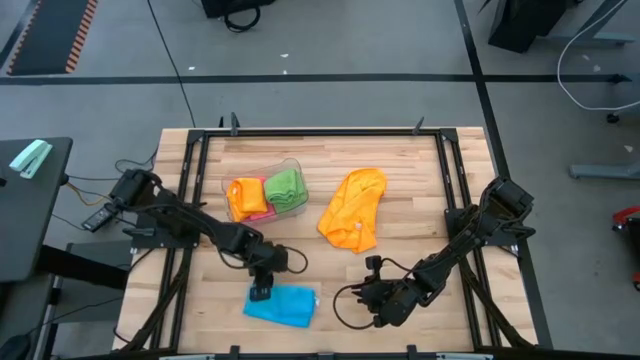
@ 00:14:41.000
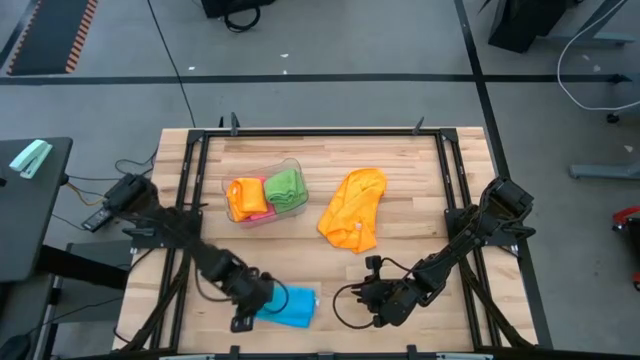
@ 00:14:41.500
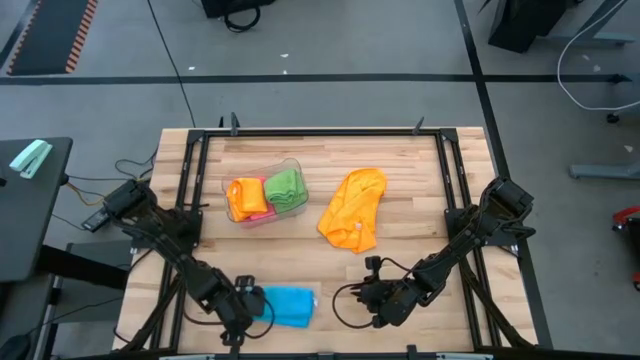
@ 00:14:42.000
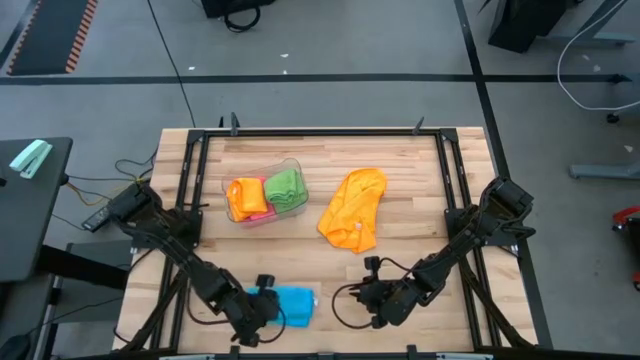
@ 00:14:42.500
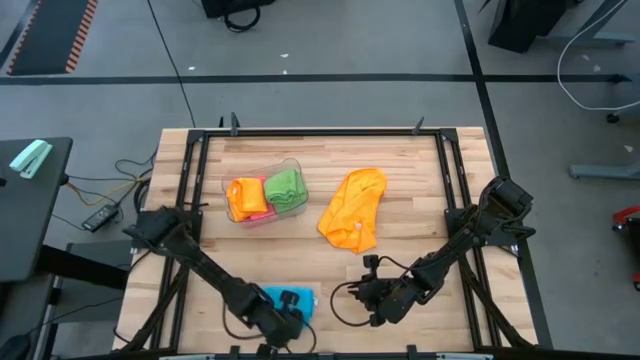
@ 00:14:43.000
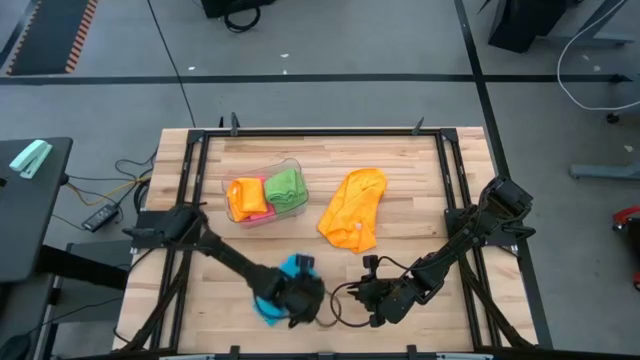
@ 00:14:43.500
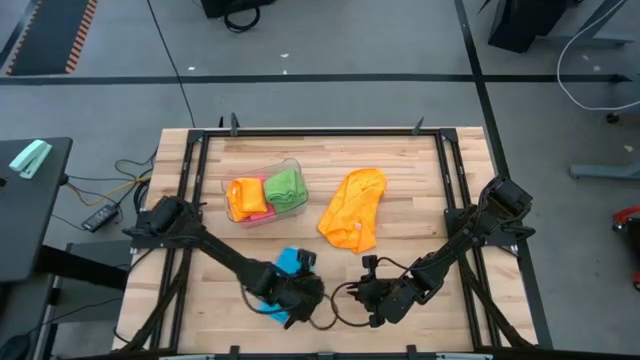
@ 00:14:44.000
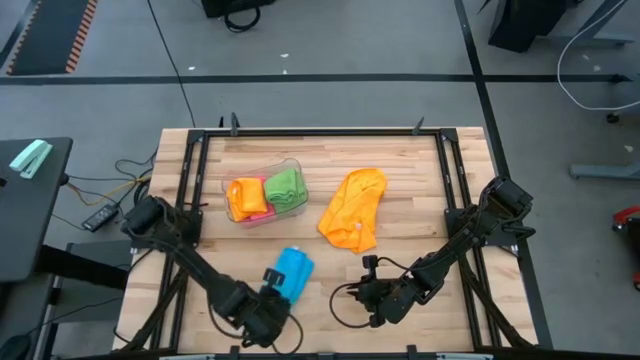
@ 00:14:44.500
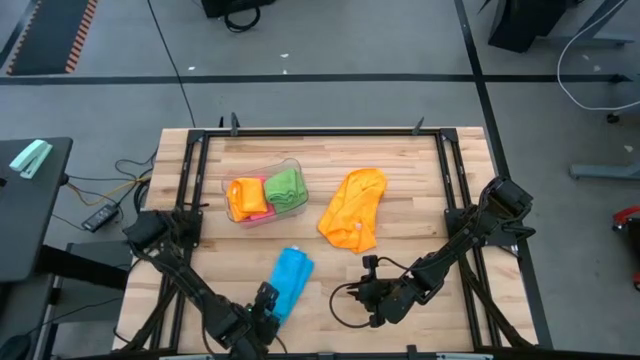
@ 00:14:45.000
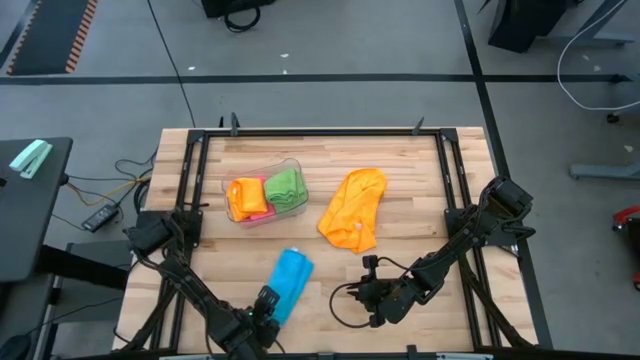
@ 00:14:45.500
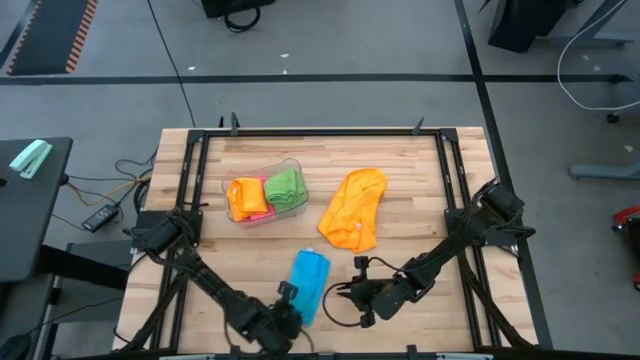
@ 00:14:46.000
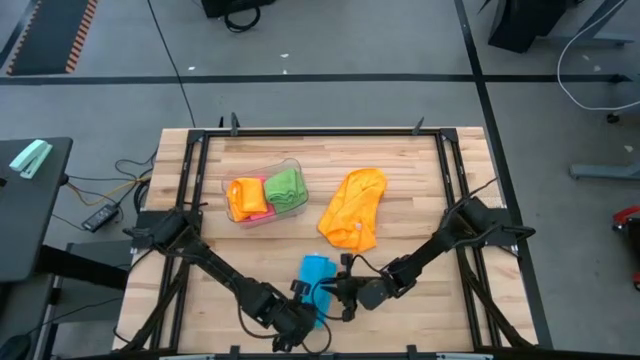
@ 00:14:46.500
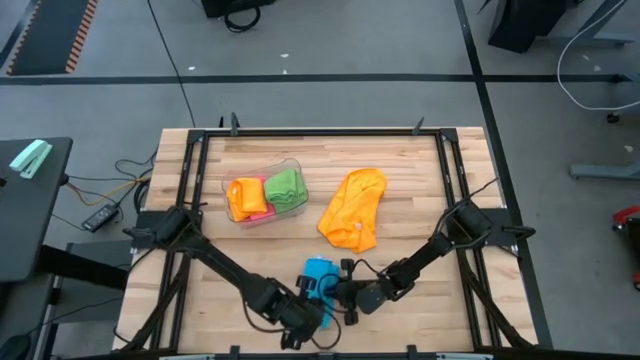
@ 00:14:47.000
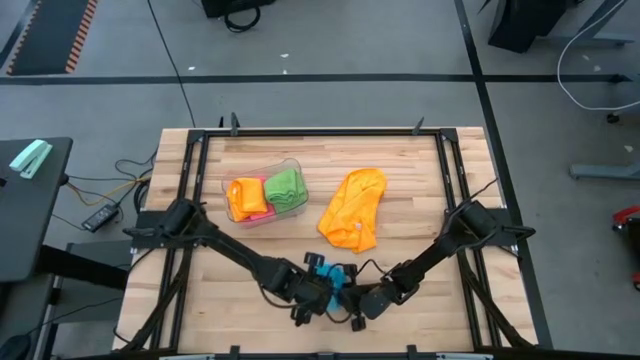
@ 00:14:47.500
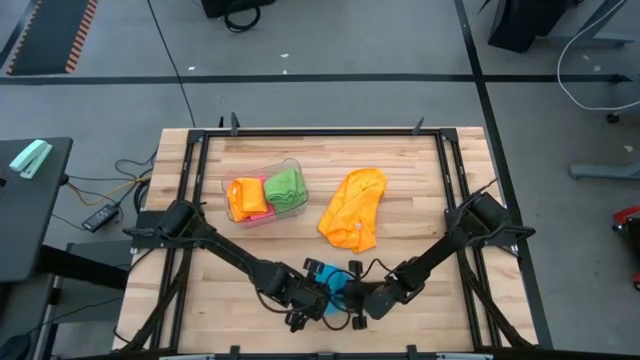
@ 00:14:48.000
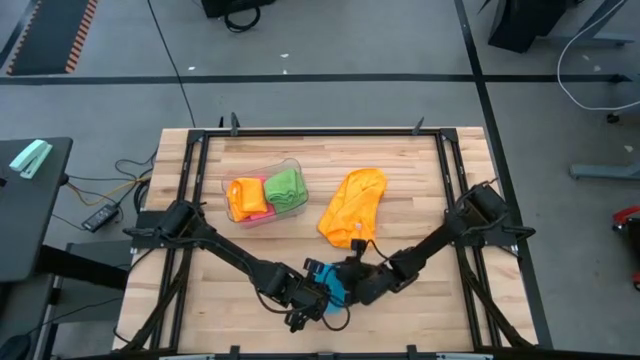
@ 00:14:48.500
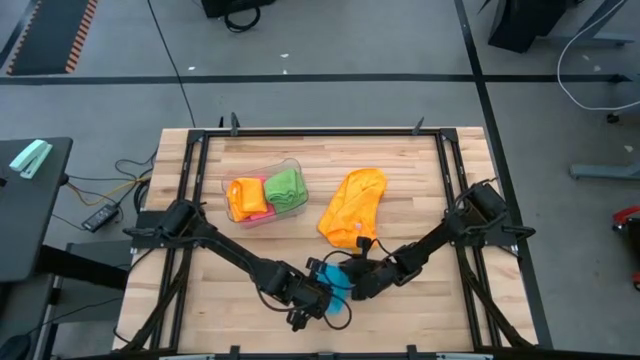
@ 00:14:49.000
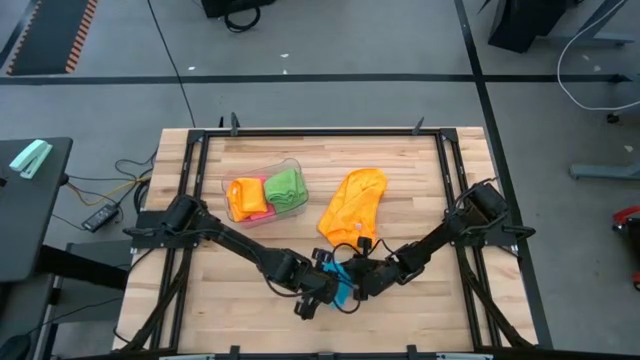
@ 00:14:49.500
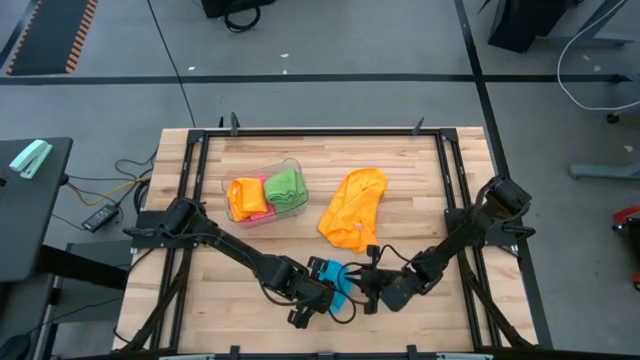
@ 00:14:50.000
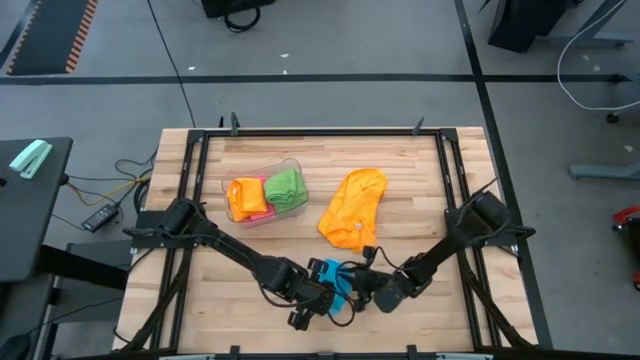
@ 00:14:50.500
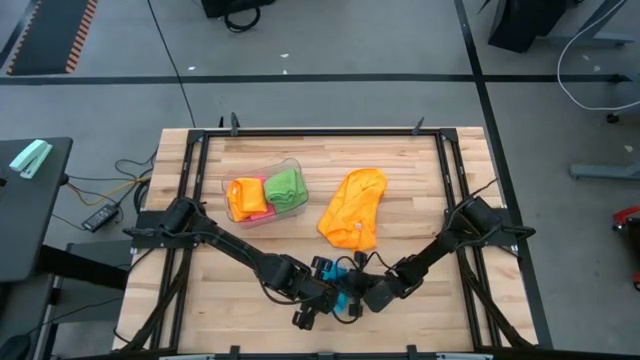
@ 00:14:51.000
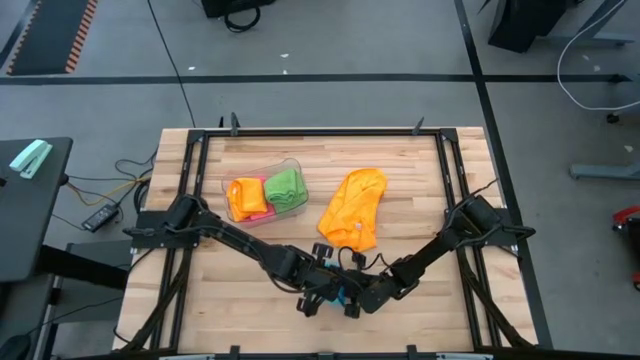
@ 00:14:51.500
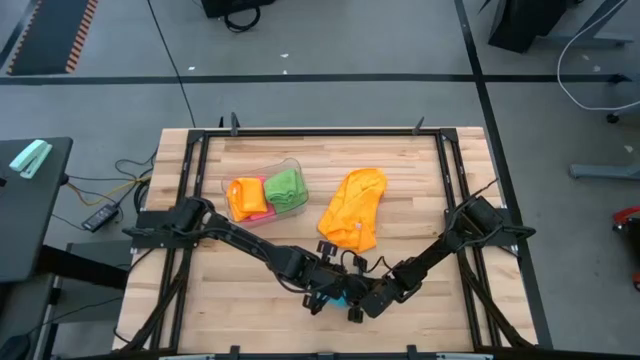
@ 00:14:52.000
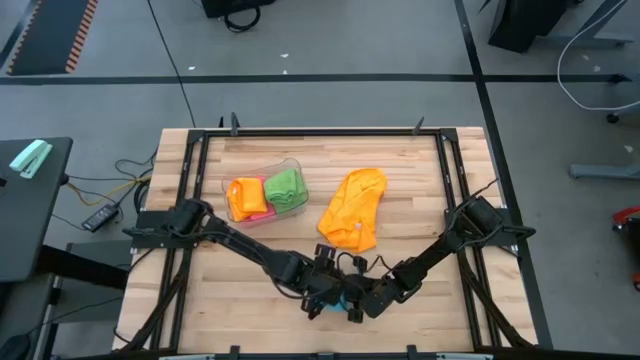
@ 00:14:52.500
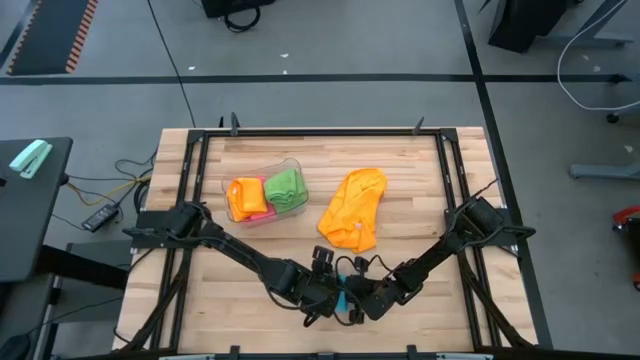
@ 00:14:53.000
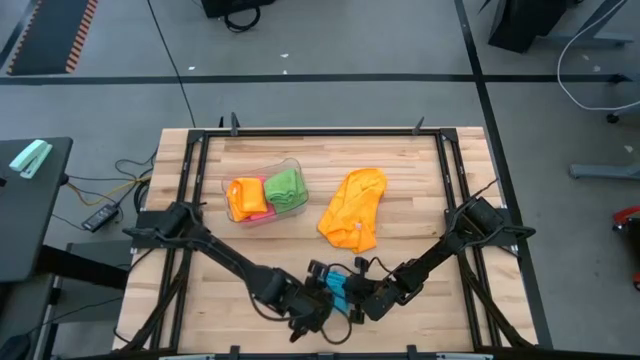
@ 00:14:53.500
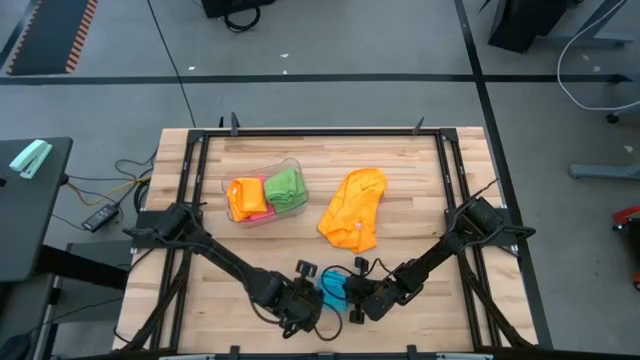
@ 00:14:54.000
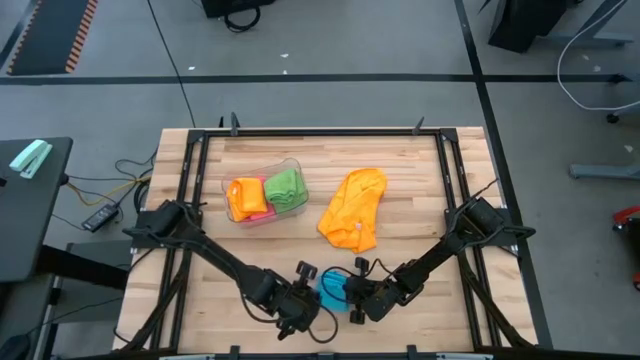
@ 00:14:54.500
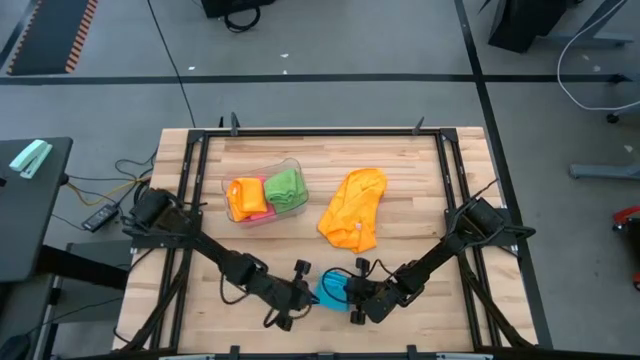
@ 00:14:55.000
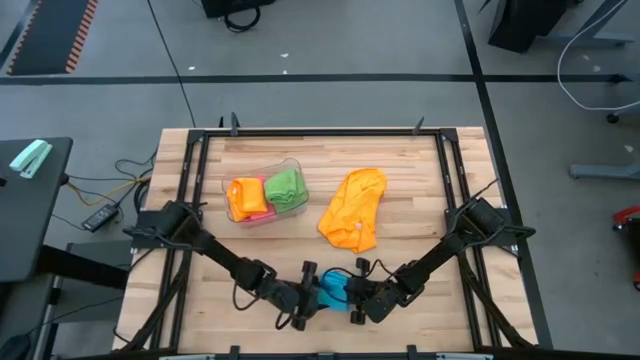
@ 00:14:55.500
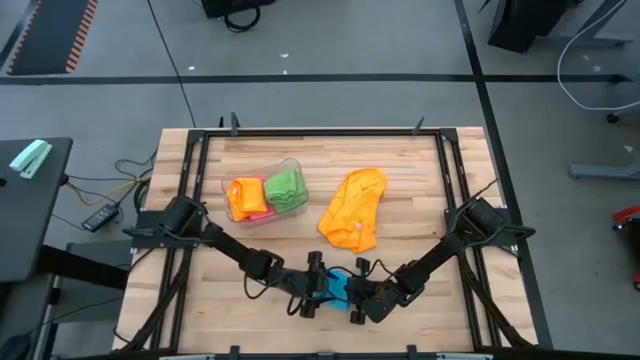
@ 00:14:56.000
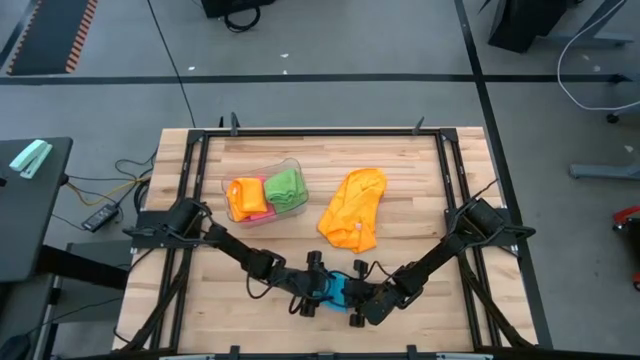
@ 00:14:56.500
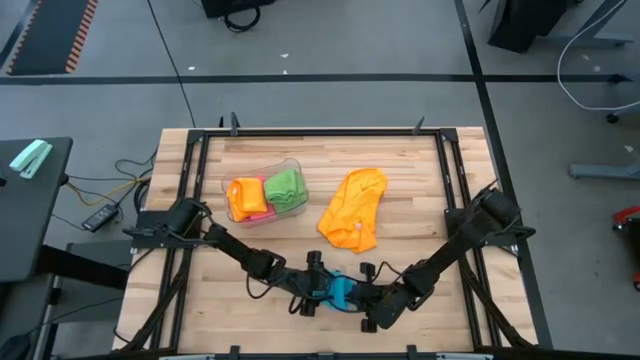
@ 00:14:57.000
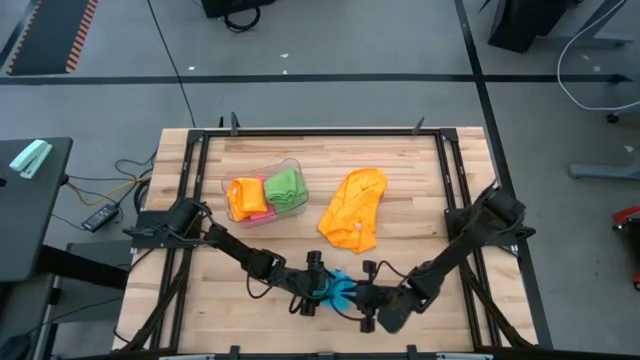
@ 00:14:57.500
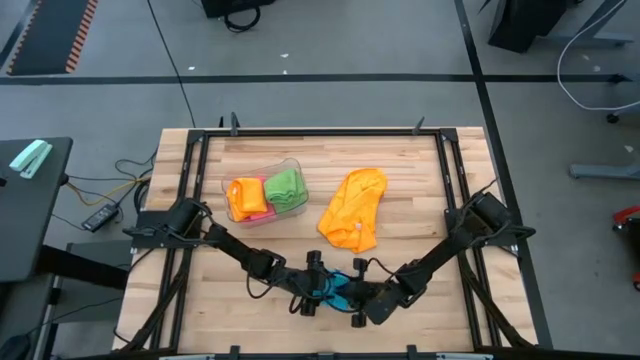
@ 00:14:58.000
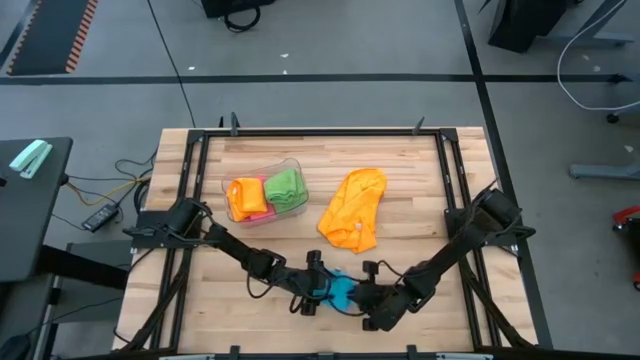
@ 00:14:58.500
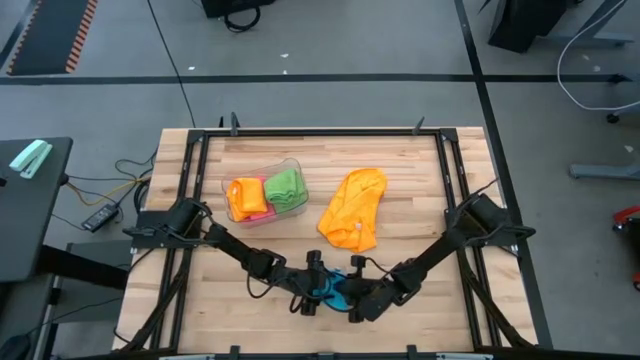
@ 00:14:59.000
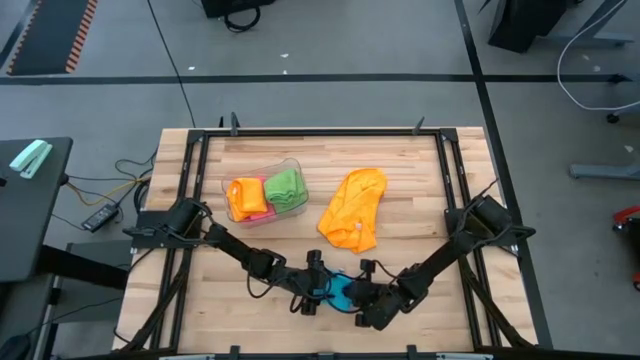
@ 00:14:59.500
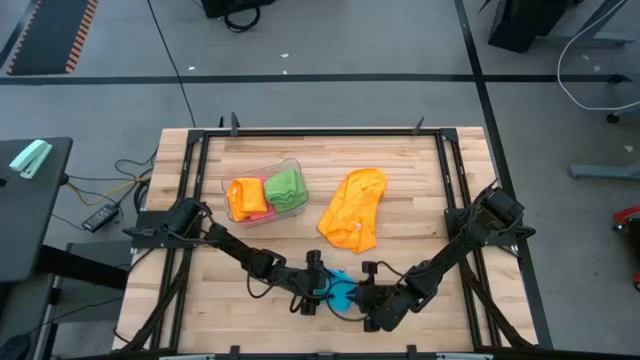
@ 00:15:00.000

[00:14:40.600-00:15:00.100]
Task: Fold microfiber towels
Fold the blue microfiber towel
